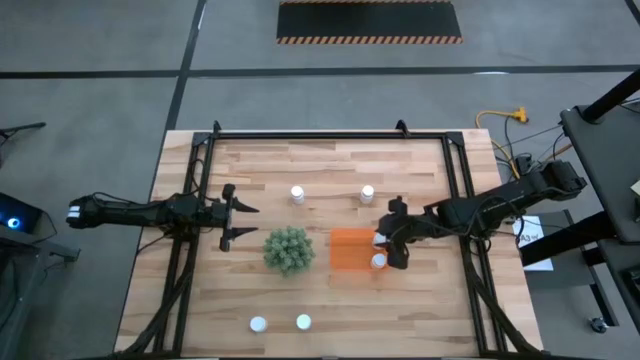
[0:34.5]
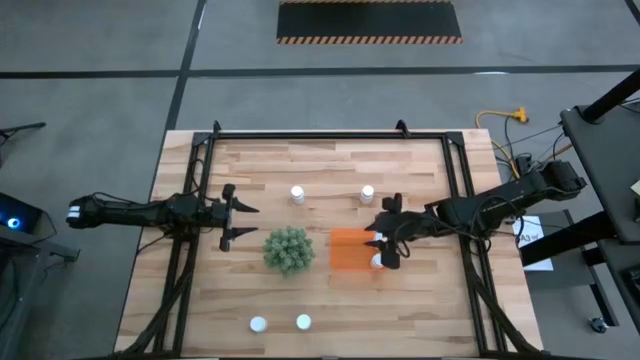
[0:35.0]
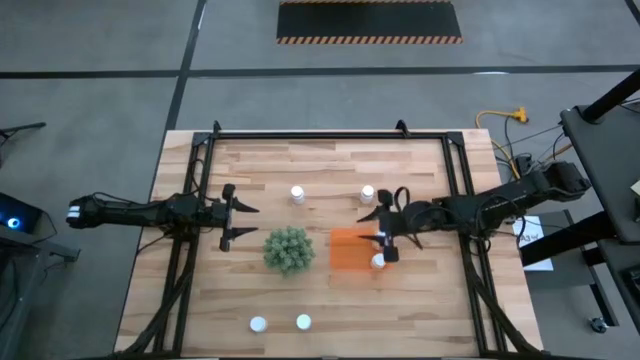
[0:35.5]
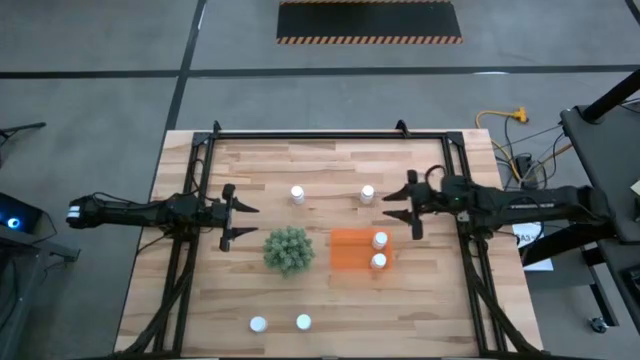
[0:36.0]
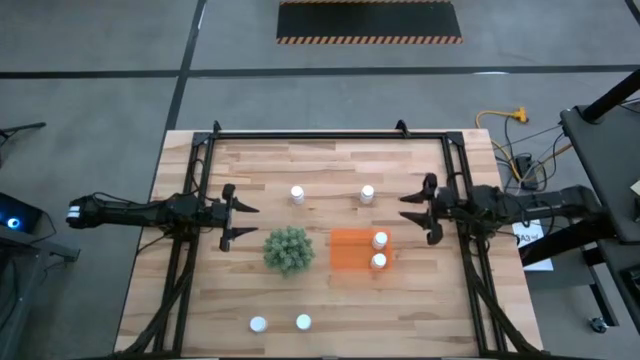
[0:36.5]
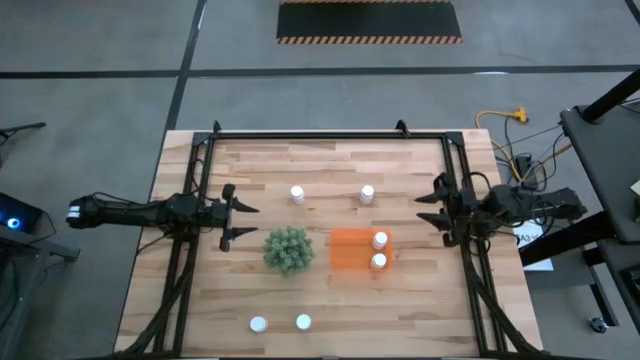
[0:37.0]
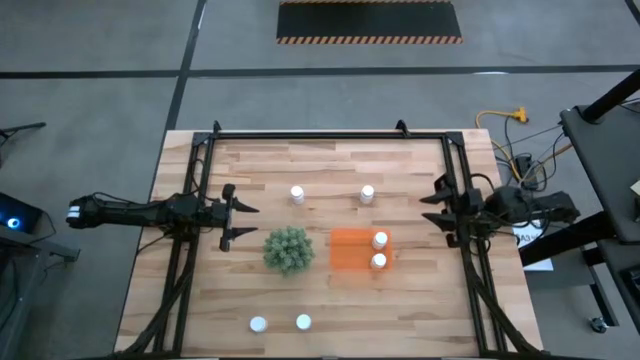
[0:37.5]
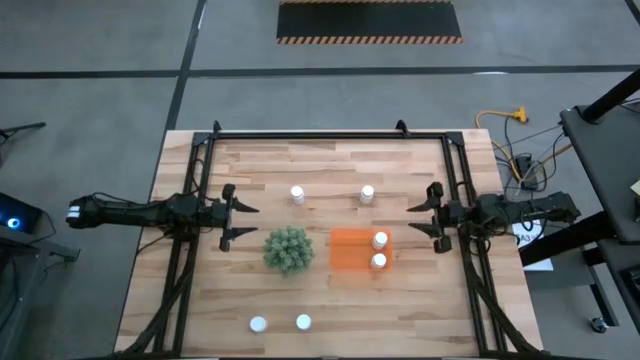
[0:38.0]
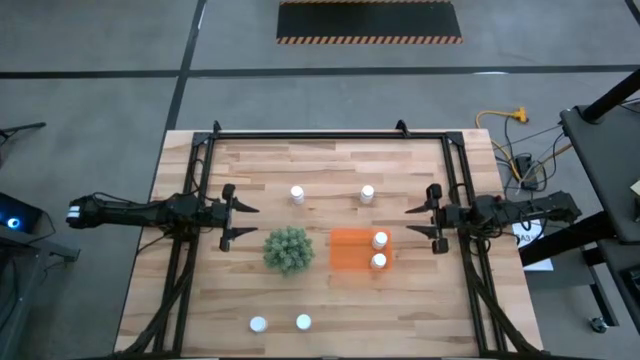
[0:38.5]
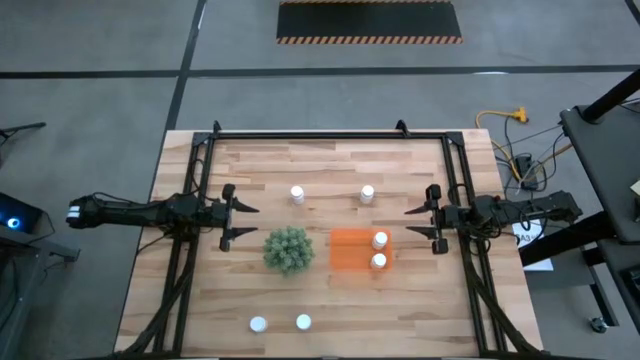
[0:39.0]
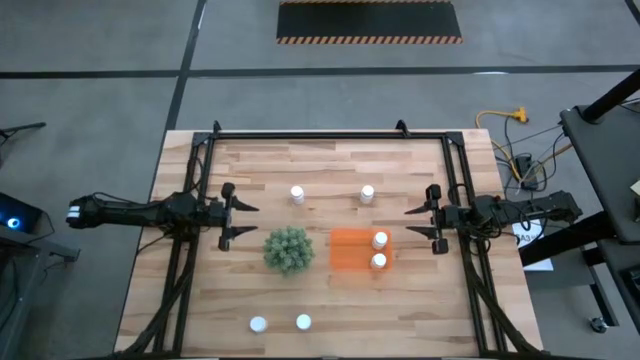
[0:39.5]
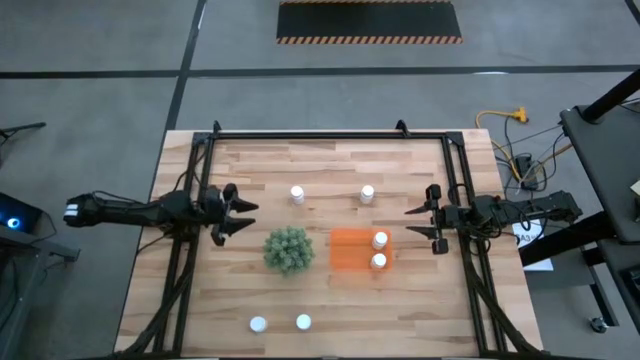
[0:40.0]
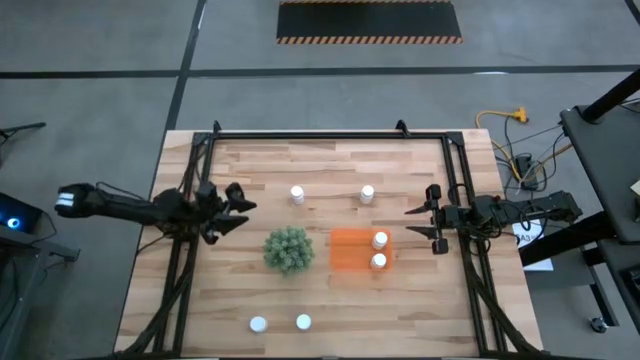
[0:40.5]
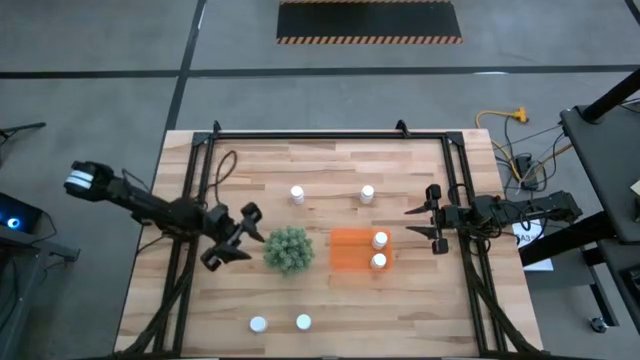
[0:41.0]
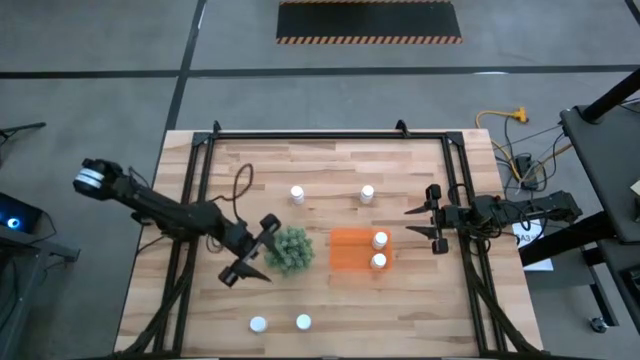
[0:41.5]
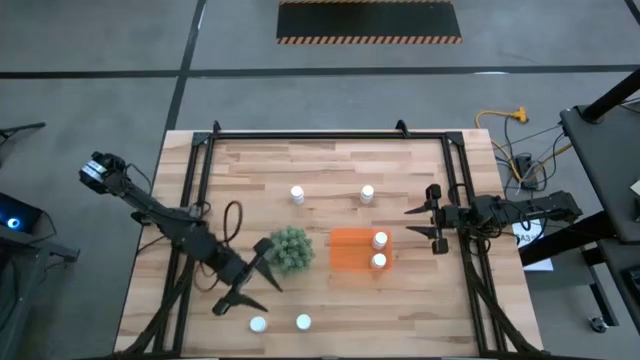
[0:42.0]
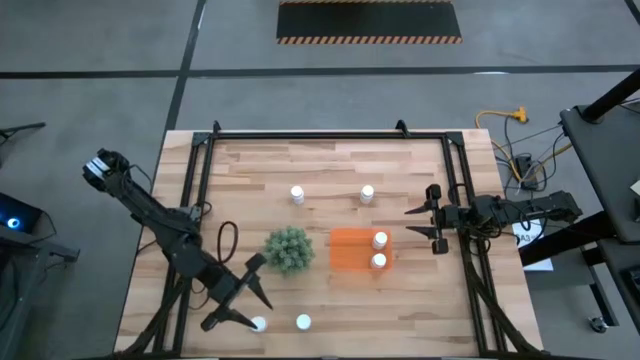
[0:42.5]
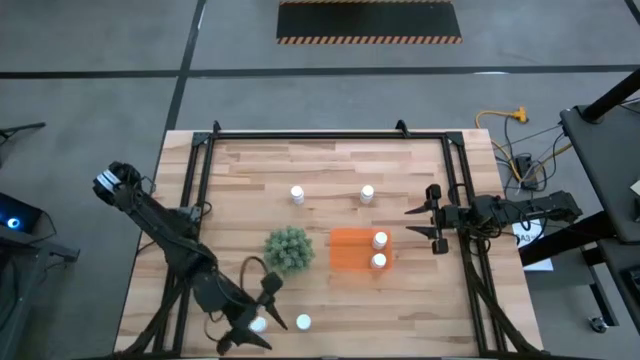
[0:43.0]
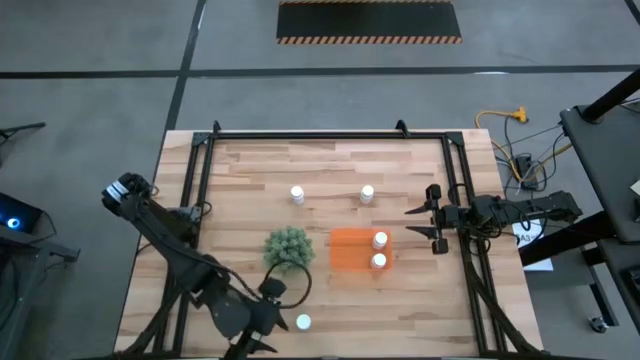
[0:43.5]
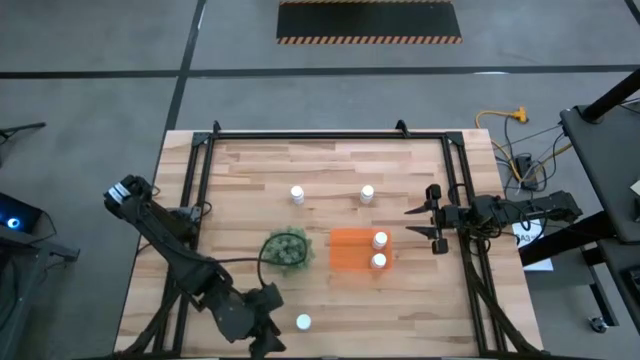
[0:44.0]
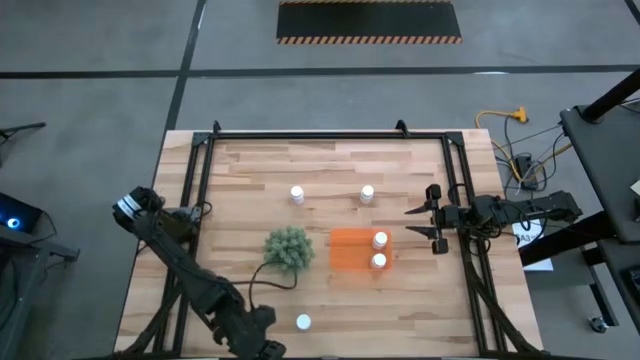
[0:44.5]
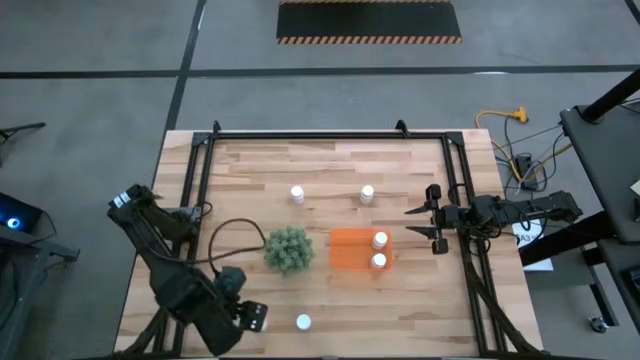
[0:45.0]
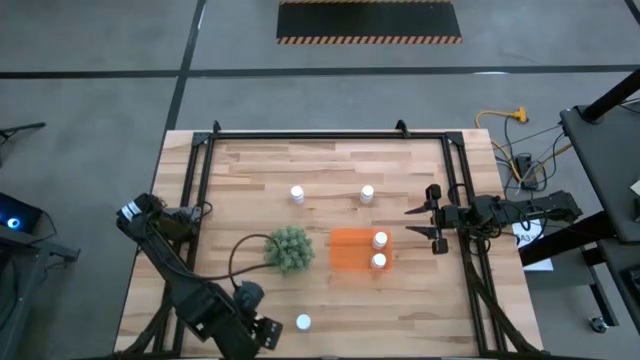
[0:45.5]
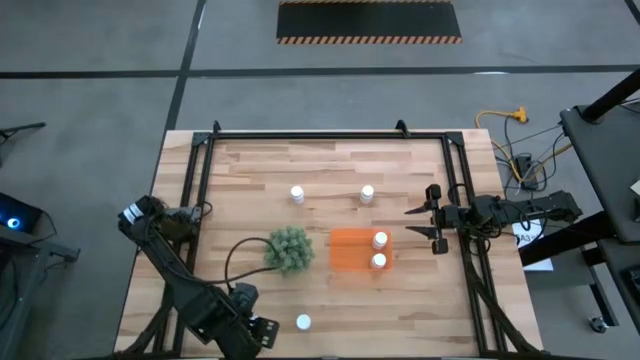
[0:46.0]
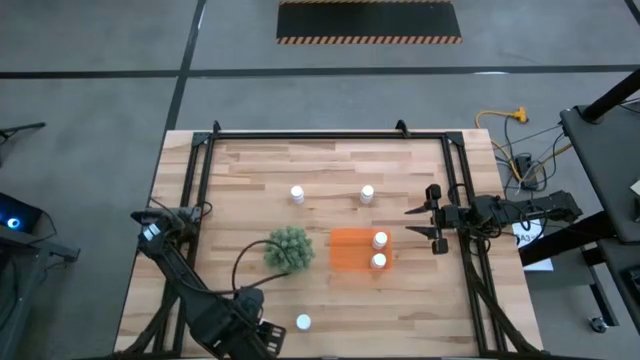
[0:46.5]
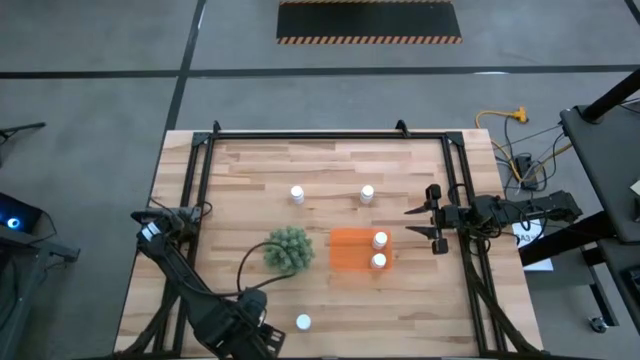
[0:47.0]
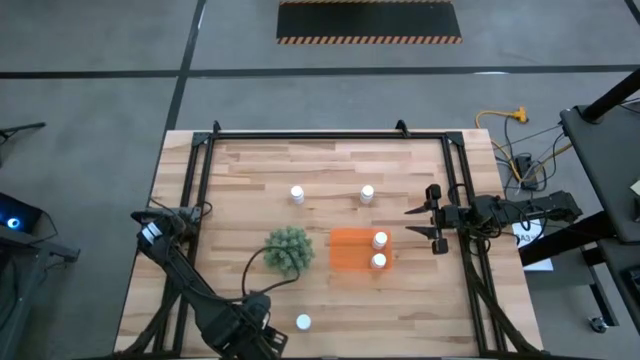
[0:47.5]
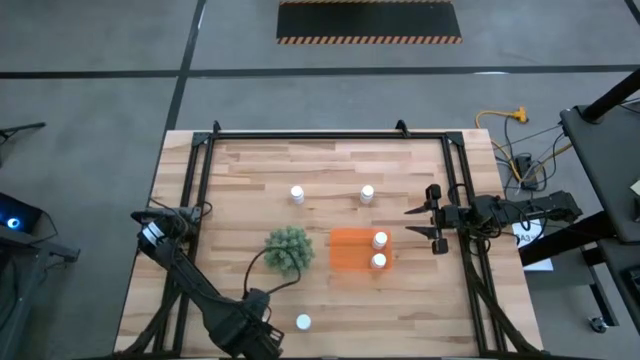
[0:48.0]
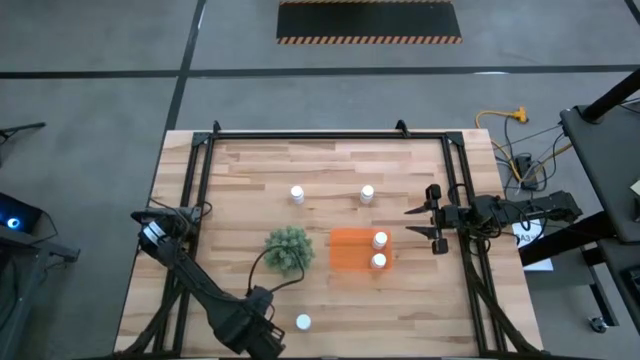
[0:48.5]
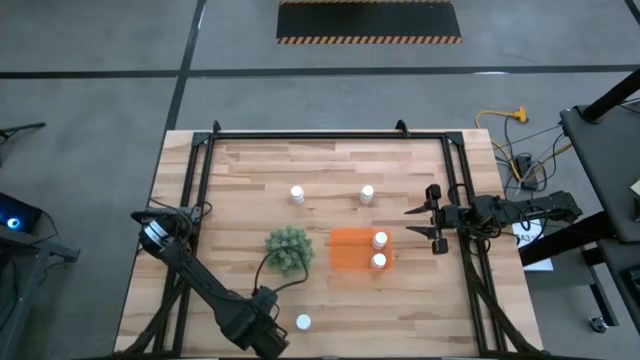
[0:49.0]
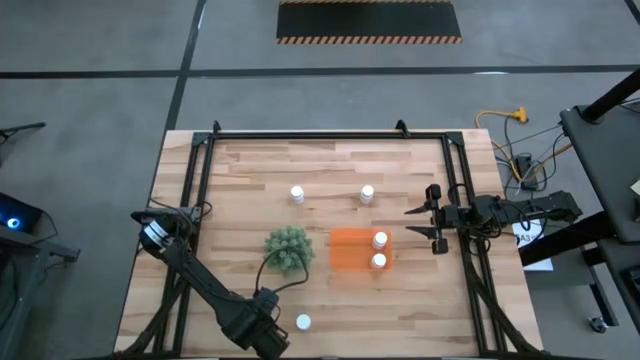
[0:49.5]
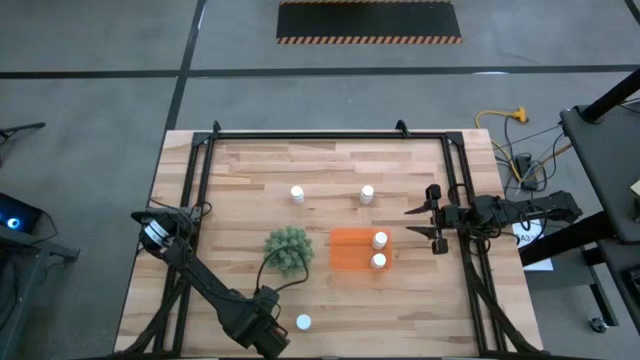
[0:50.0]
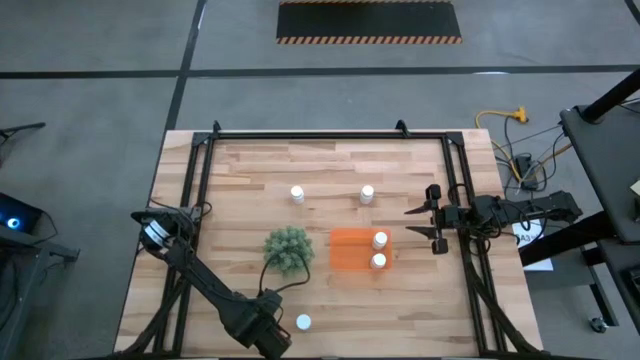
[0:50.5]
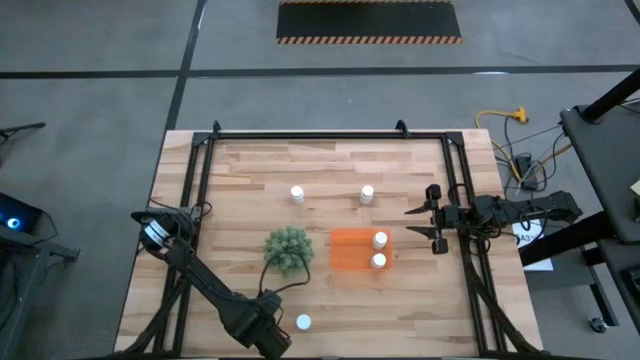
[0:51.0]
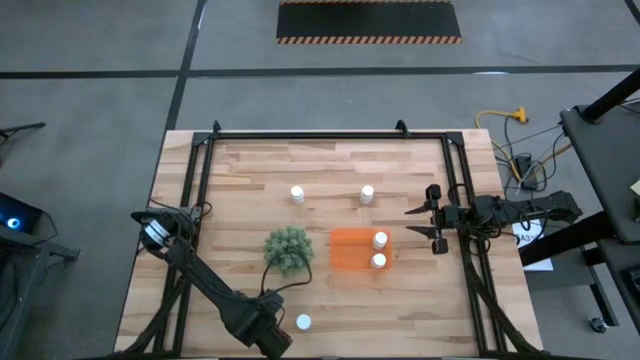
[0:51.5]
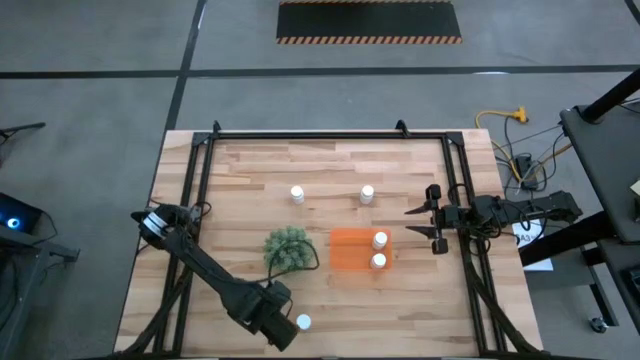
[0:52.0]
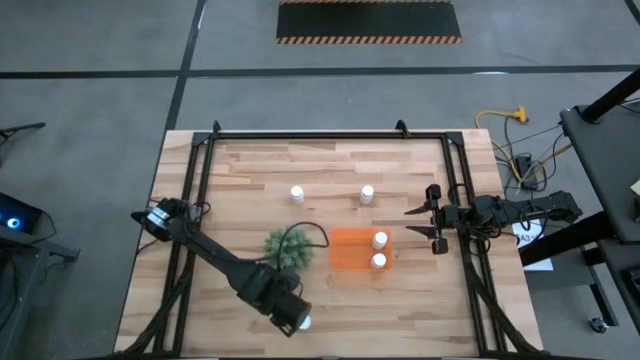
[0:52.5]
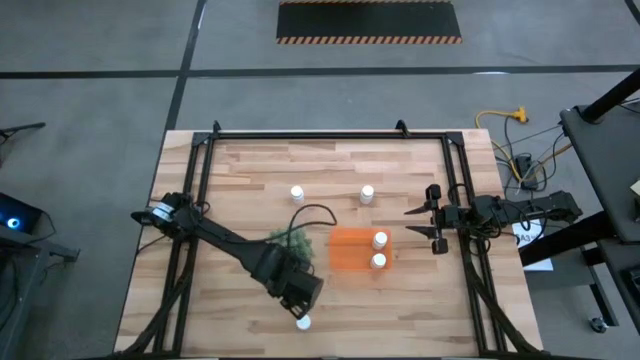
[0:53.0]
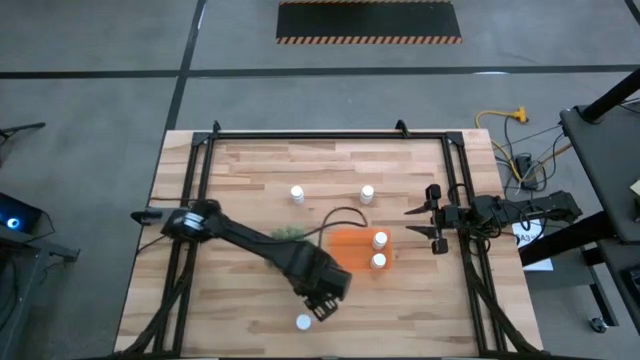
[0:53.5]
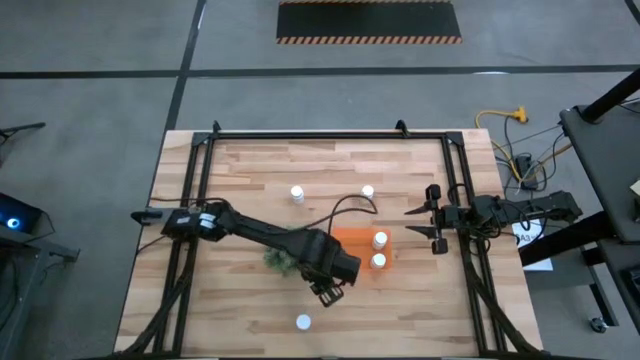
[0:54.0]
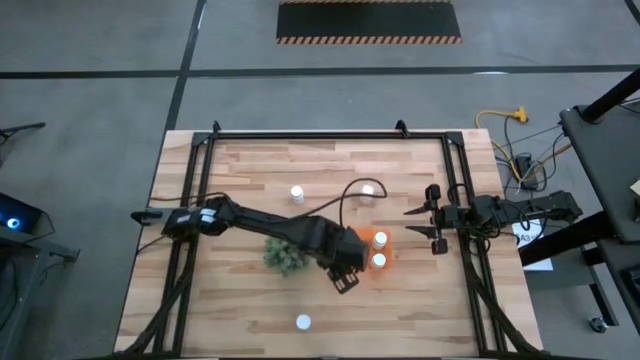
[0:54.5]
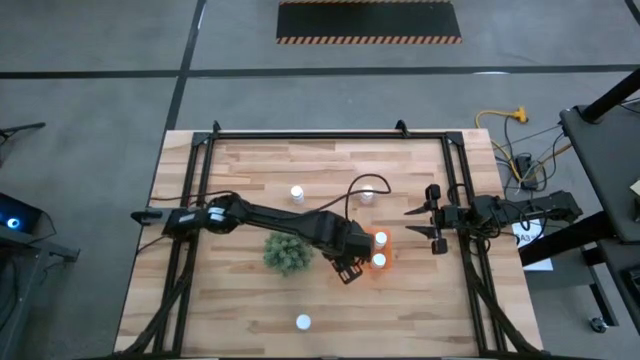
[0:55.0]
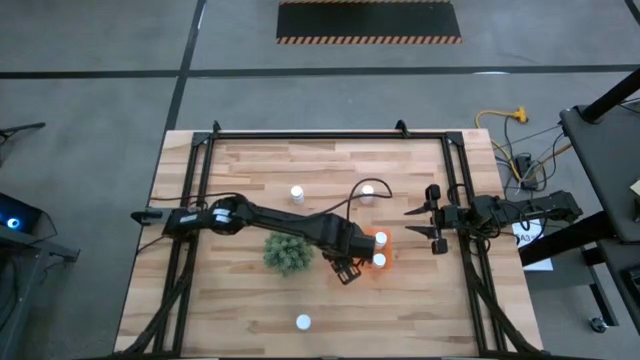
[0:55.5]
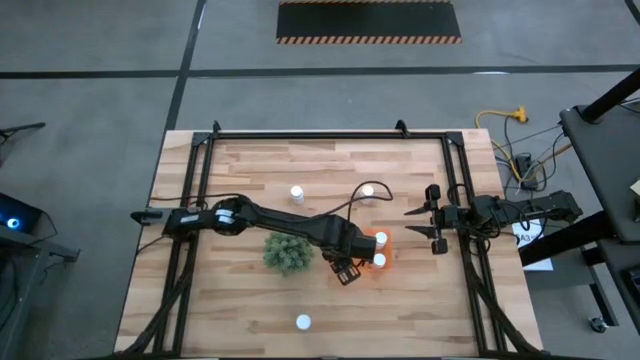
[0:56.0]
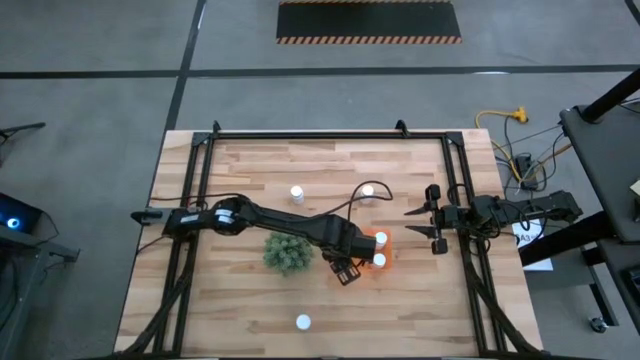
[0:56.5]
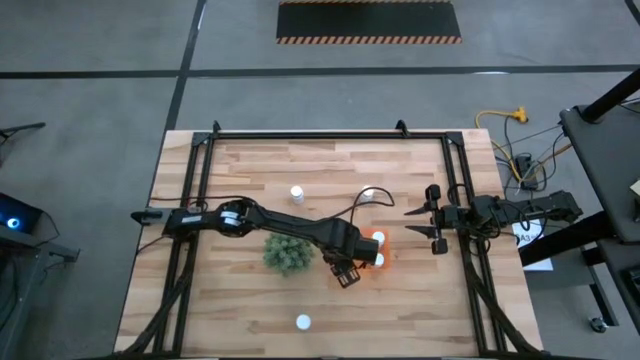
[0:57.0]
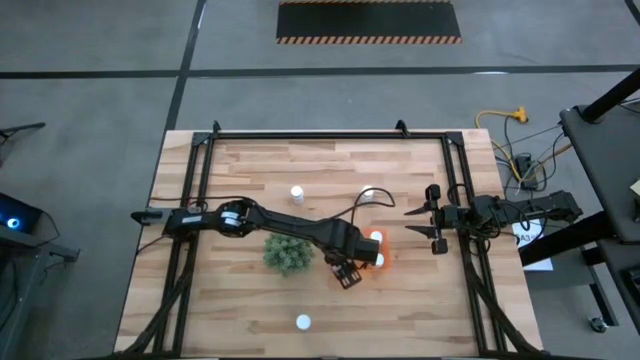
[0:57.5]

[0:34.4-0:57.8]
Task: Pick and place pill bottles into a basket
Put the white pill bottle into the orange bin
